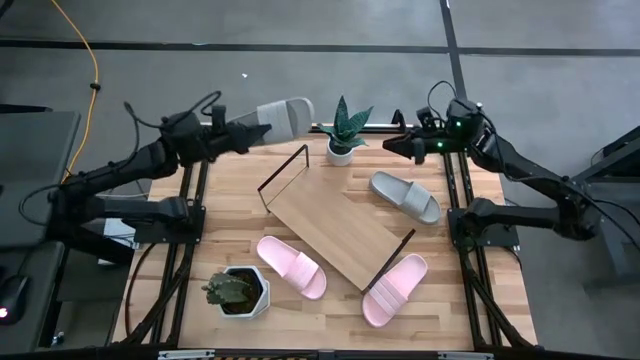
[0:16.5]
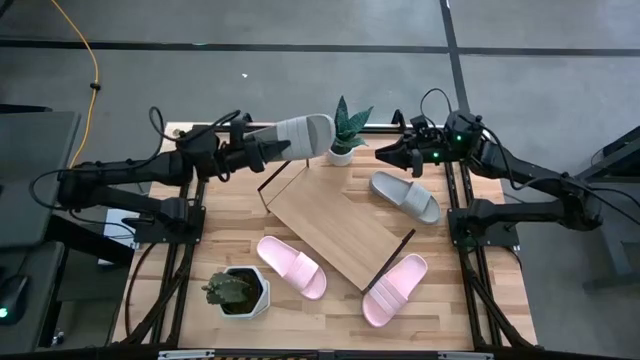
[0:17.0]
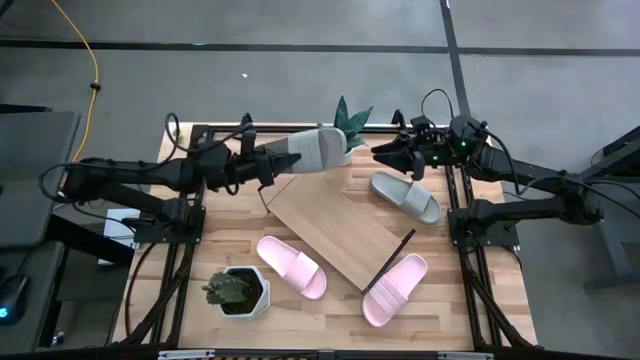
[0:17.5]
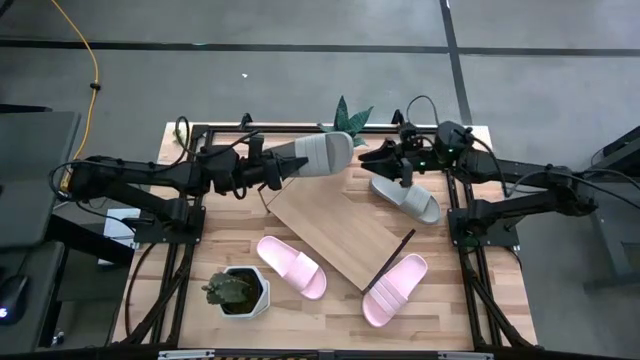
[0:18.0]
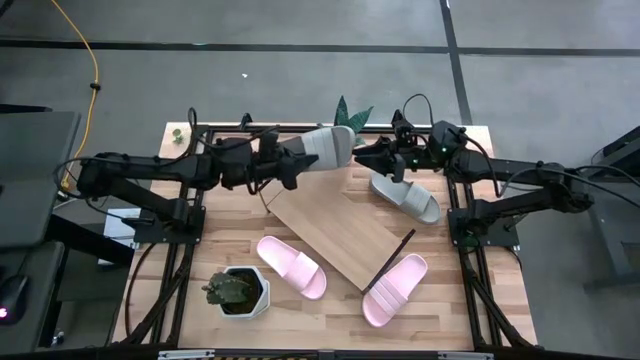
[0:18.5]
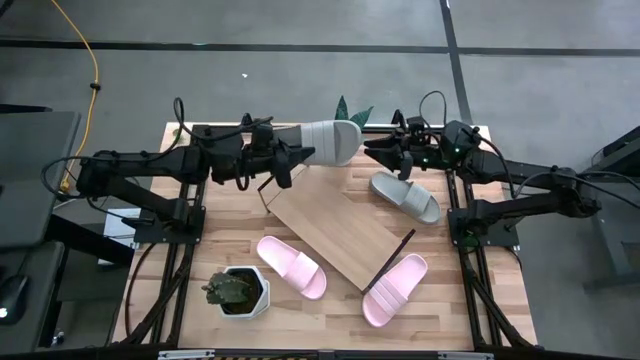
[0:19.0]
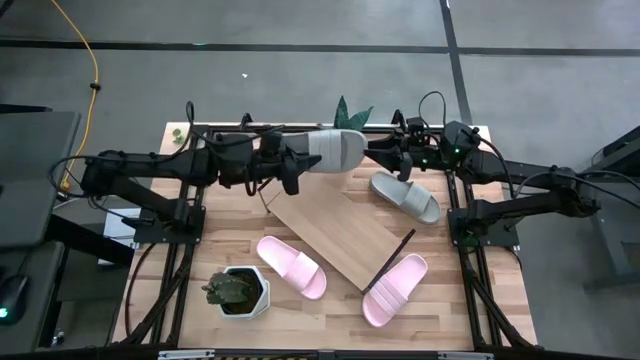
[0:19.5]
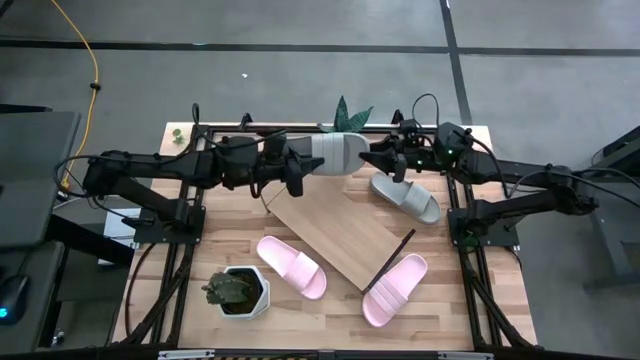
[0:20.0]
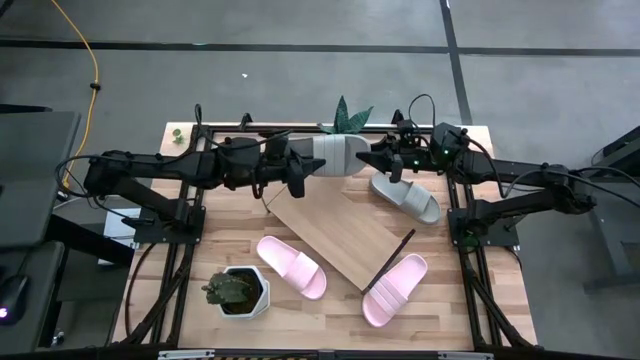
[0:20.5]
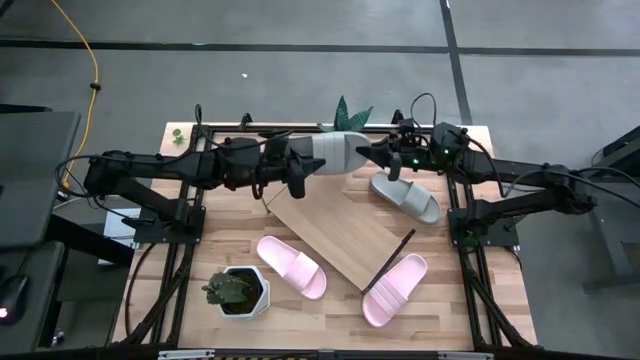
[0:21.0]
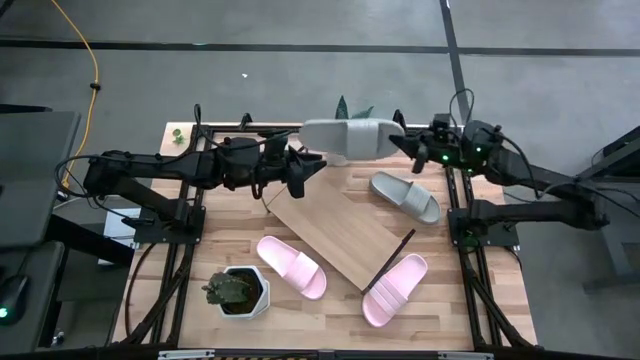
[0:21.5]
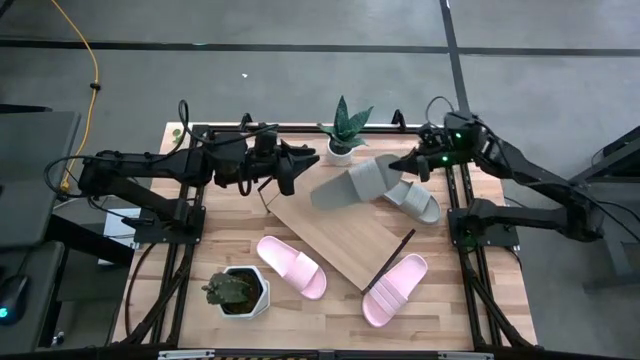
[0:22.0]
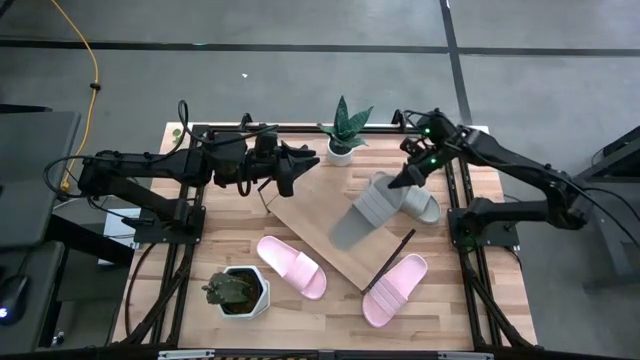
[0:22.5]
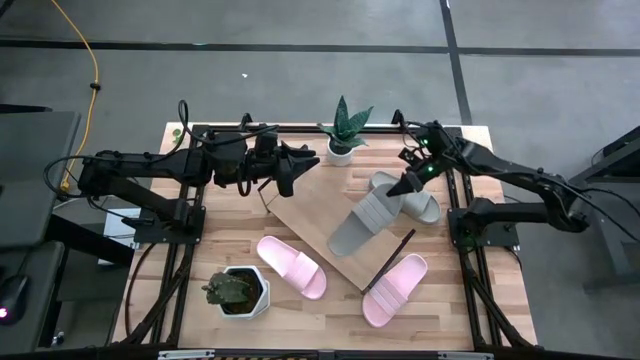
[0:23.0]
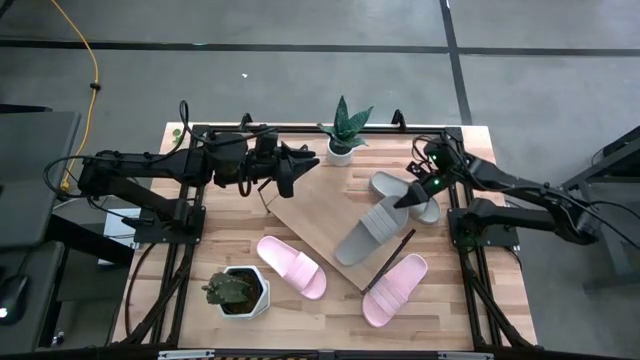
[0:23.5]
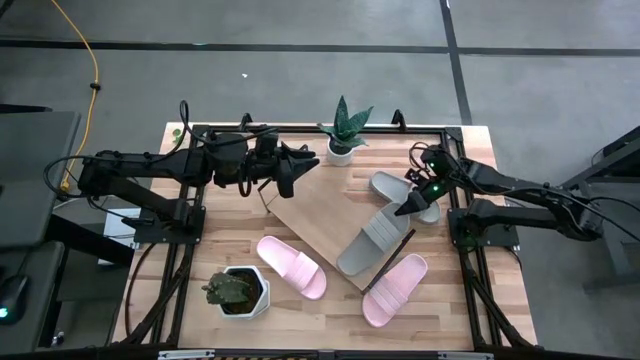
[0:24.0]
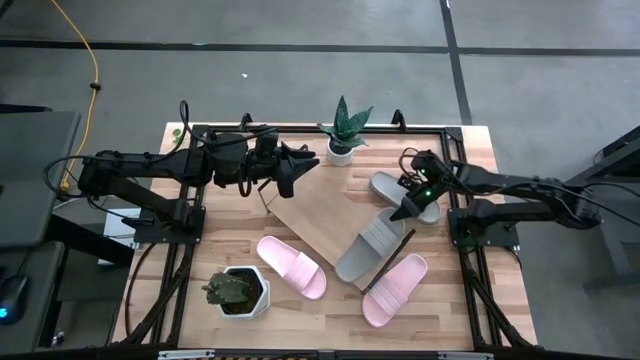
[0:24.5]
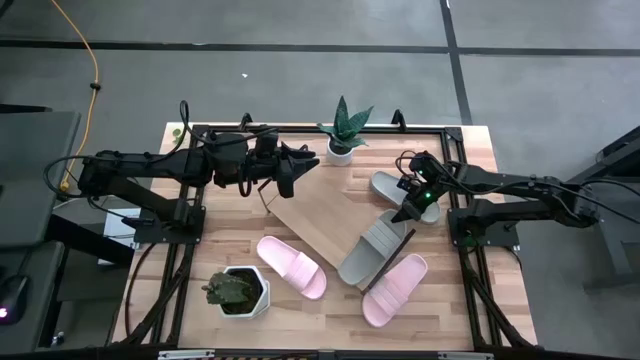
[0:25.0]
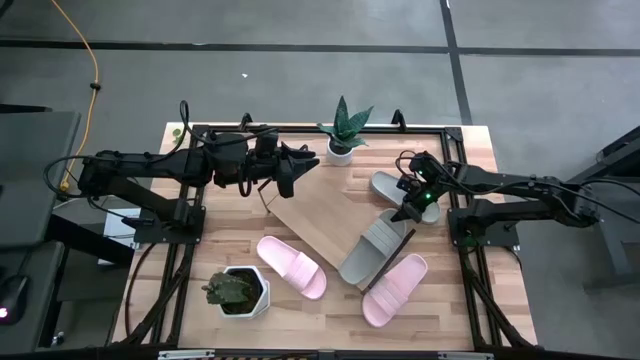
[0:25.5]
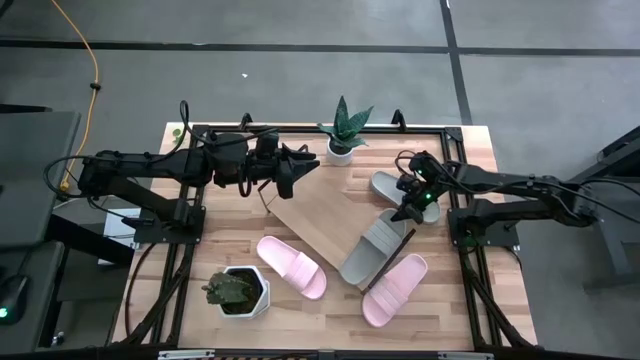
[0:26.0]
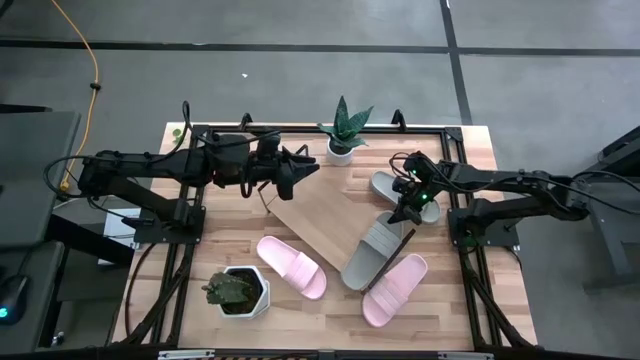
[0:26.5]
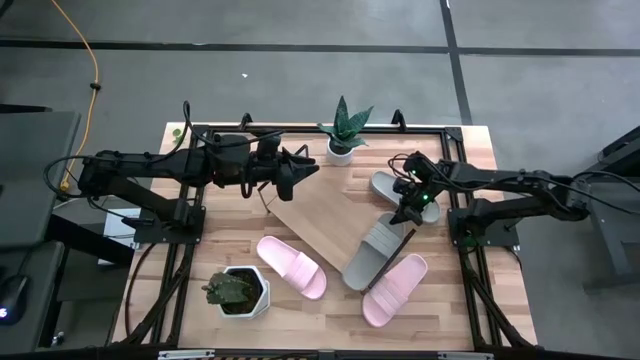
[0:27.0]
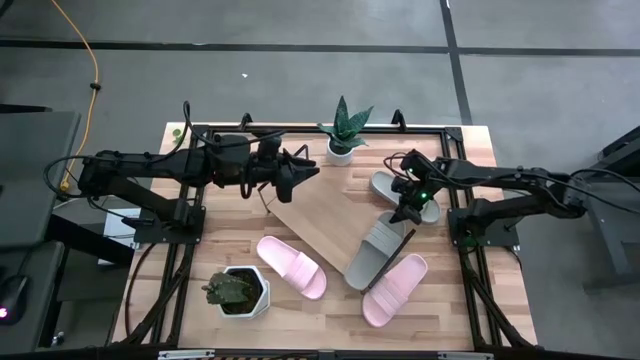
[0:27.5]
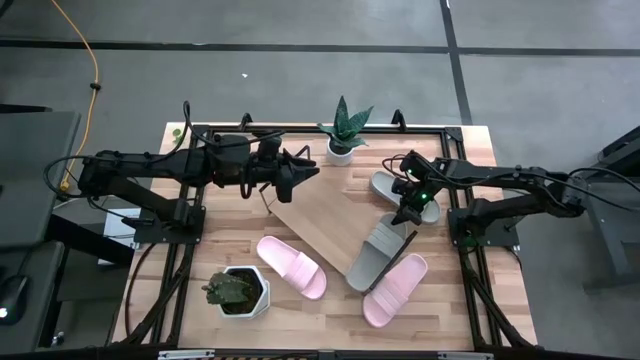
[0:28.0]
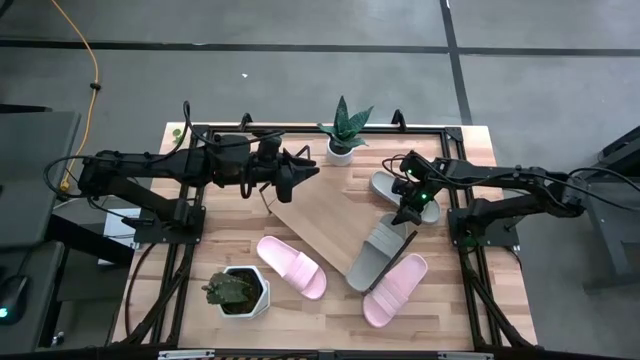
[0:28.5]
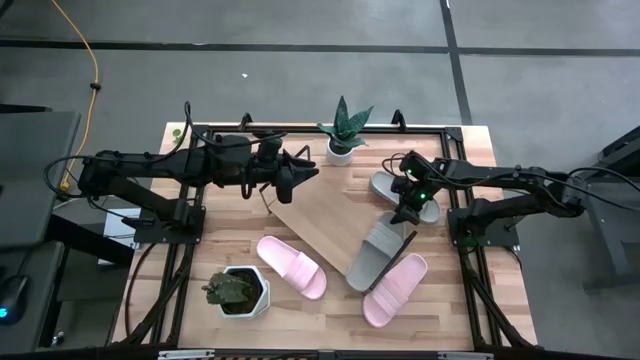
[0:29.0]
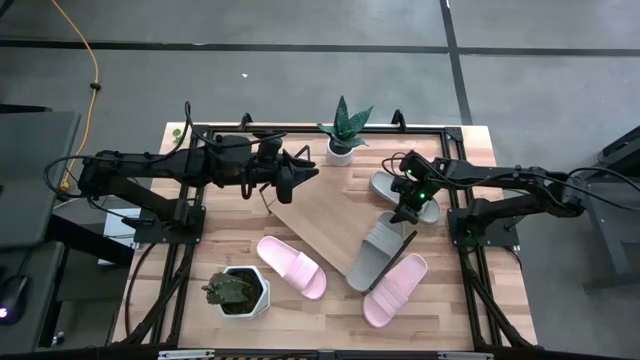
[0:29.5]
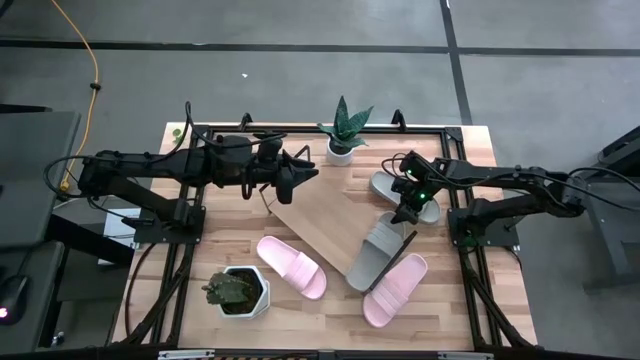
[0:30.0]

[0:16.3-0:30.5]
Task: Pick and place slides into the shelf
Put the left gray slide on the shelf

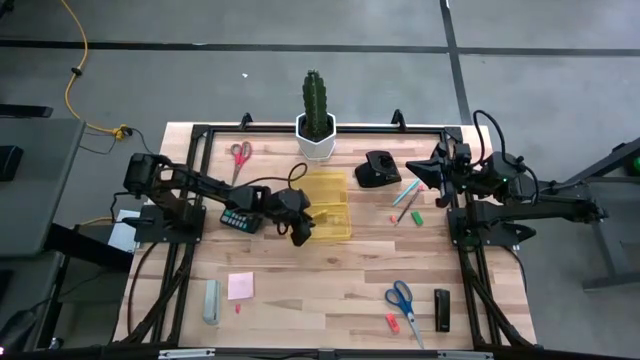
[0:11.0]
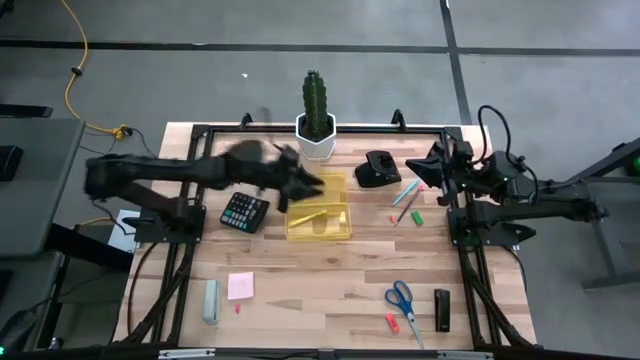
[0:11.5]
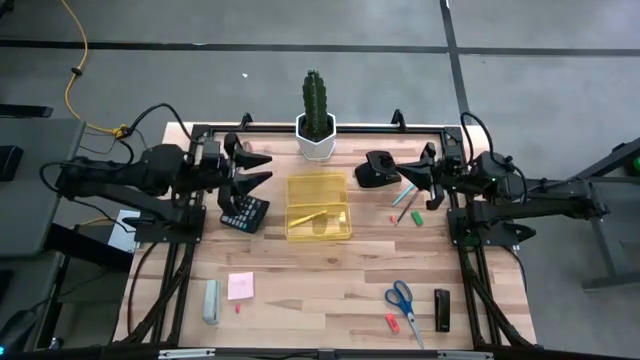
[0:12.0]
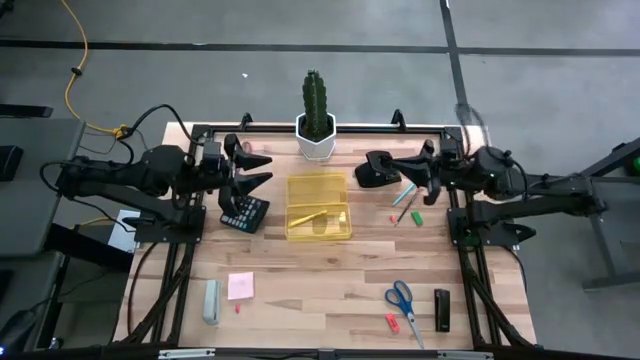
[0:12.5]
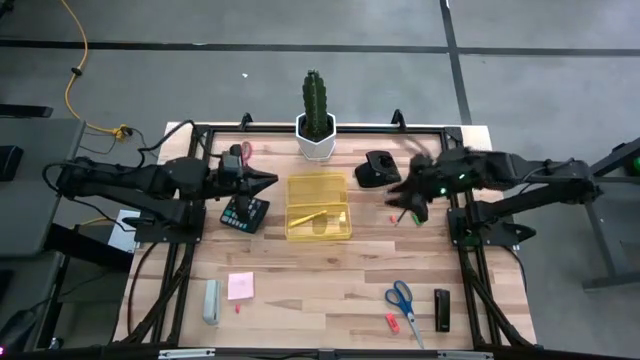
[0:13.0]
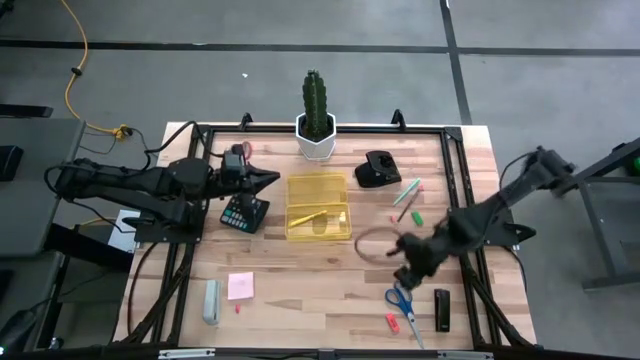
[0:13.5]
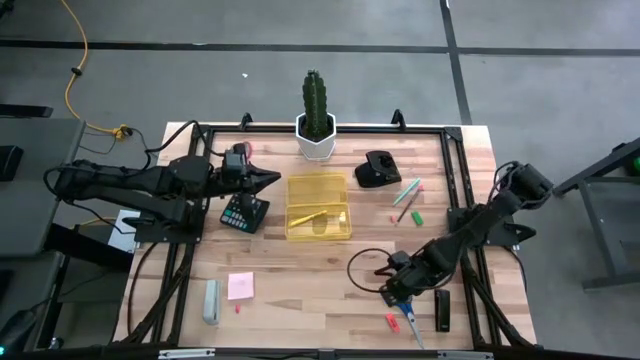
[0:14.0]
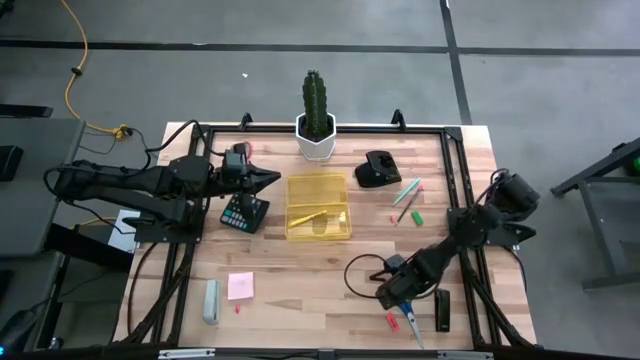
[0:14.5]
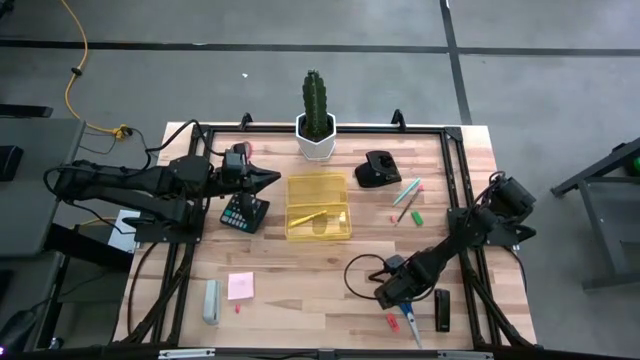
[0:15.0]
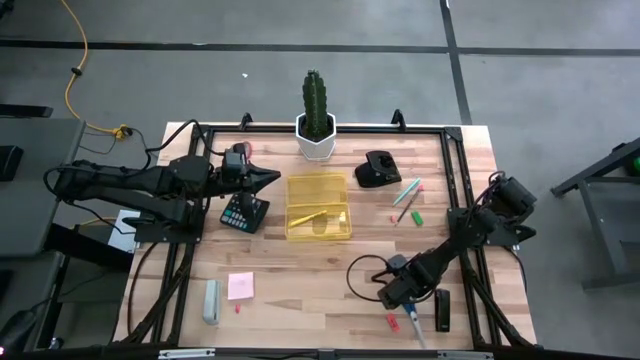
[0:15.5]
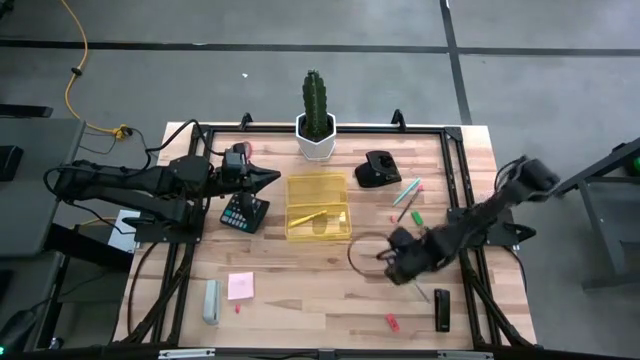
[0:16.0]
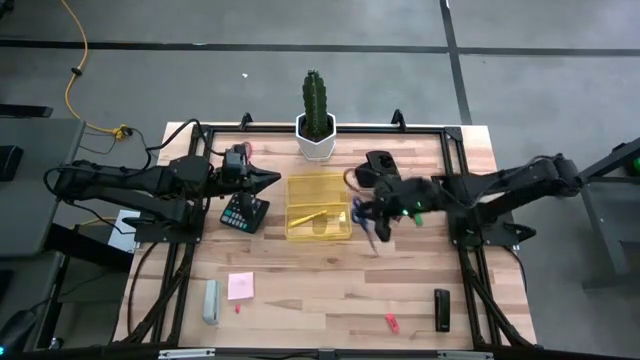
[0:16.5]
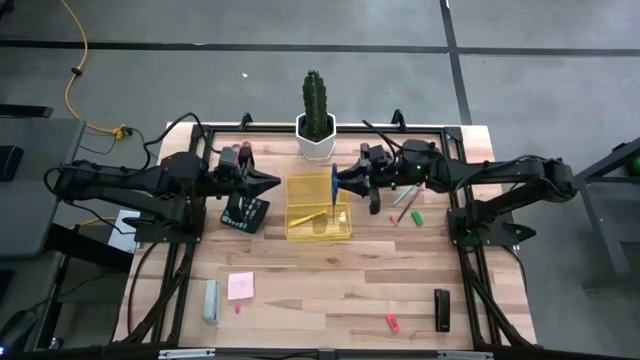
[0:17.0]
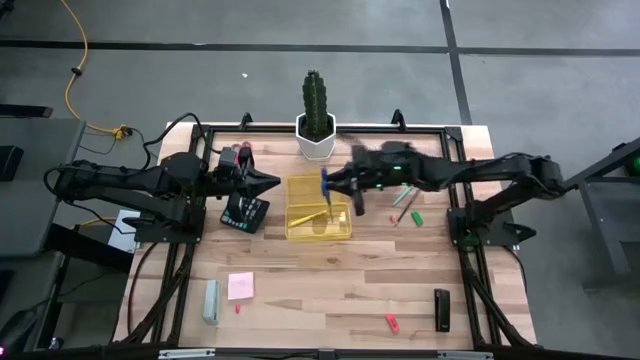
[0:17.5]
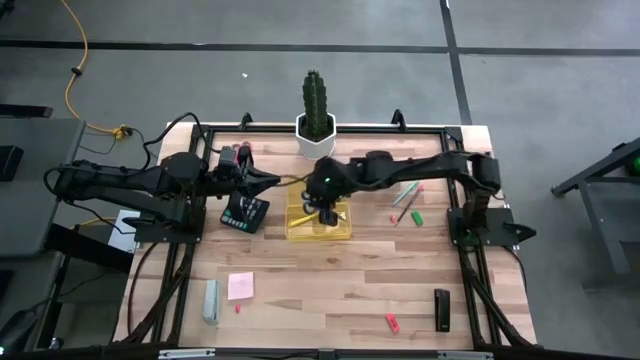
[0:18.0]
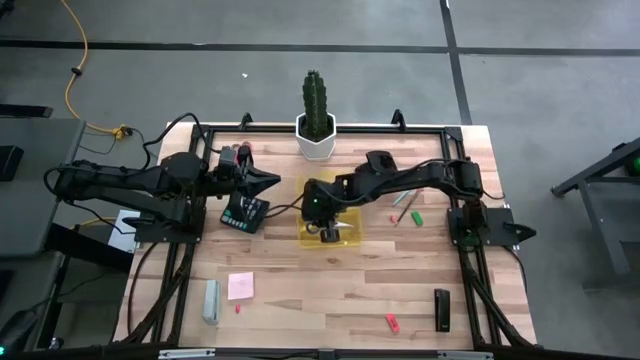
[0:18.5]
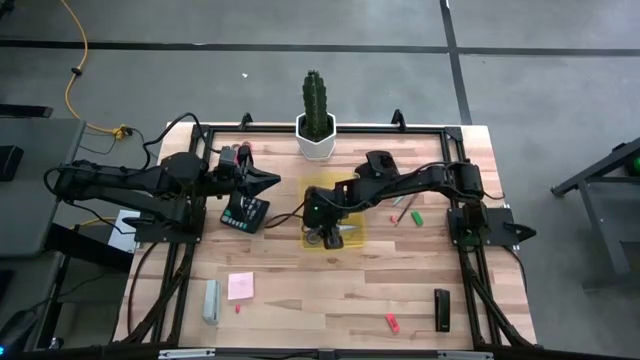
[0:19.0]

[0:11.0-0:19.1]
Task: Pack school essentials
Put the blue scissors into the supply box
